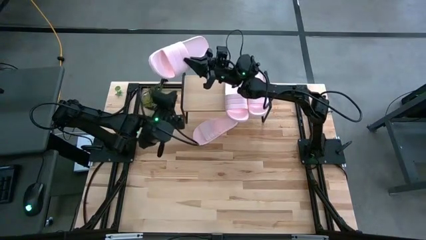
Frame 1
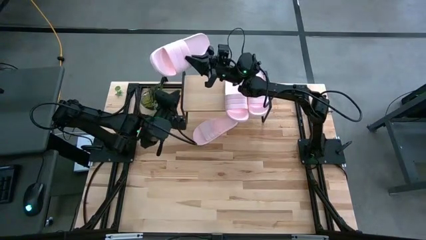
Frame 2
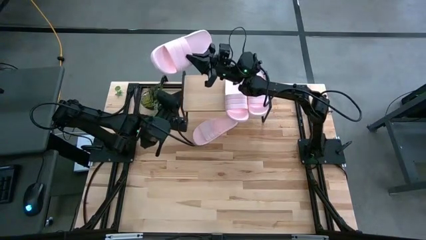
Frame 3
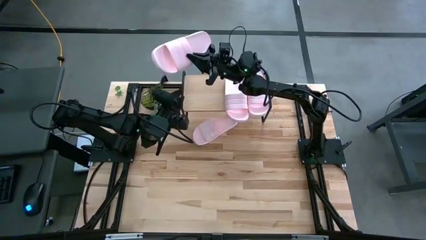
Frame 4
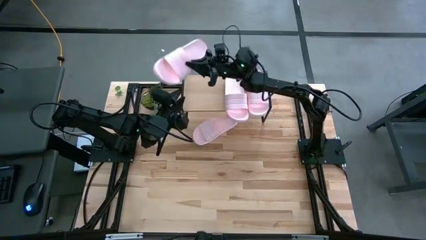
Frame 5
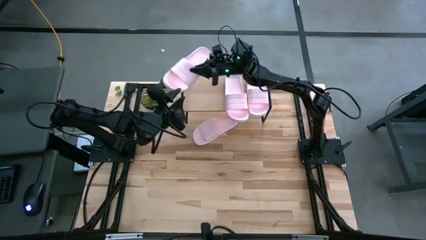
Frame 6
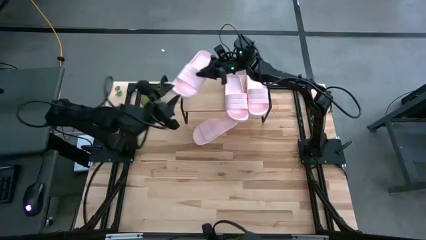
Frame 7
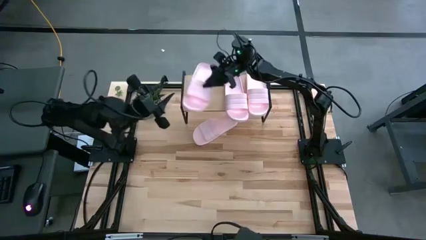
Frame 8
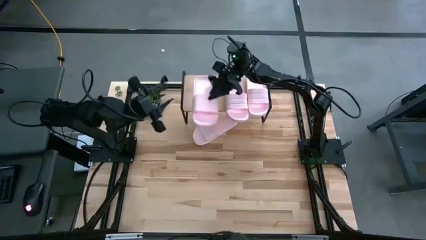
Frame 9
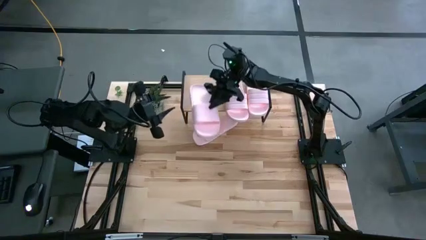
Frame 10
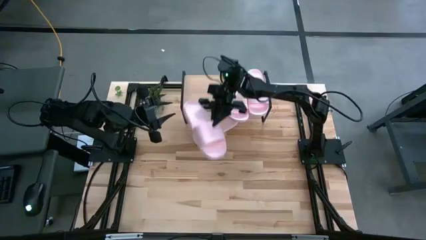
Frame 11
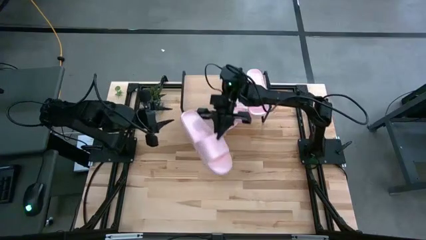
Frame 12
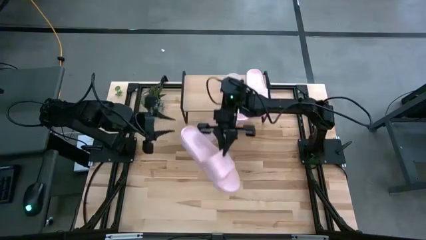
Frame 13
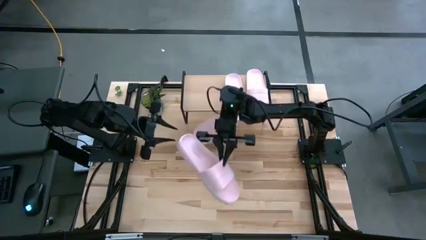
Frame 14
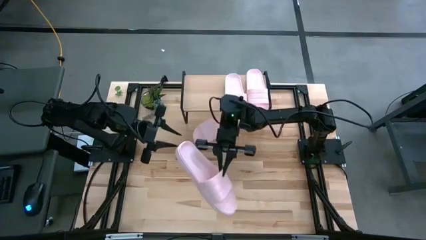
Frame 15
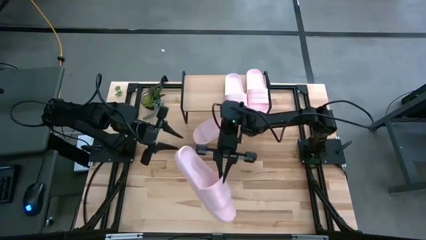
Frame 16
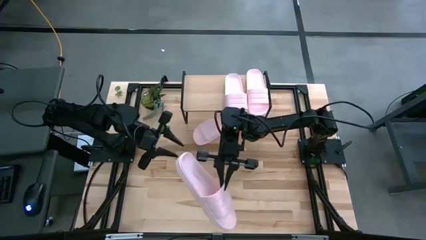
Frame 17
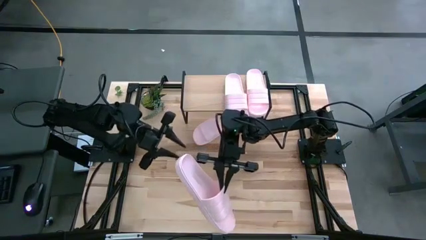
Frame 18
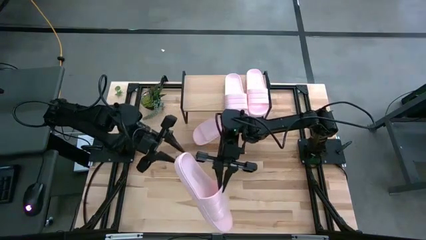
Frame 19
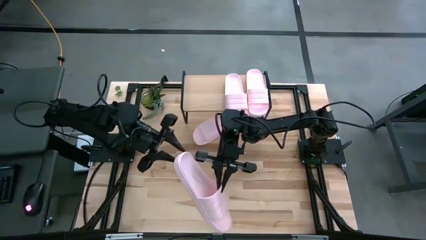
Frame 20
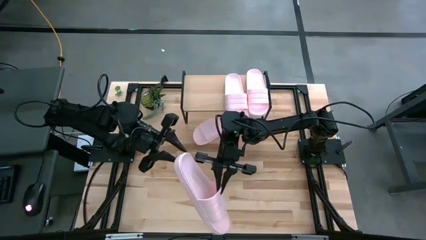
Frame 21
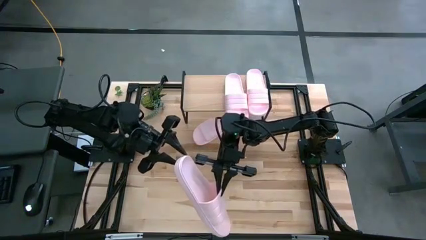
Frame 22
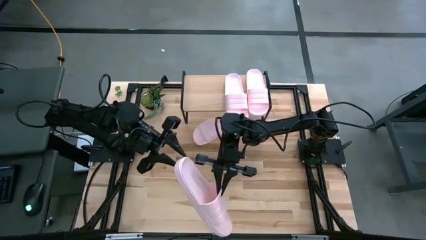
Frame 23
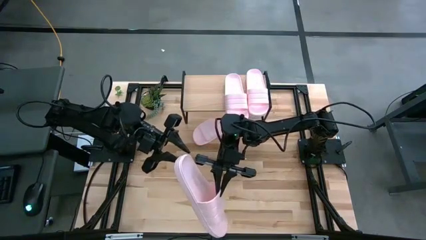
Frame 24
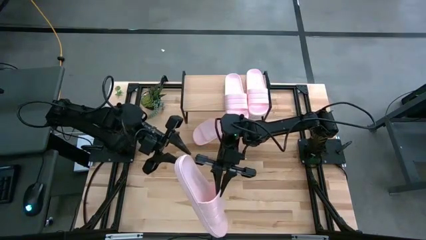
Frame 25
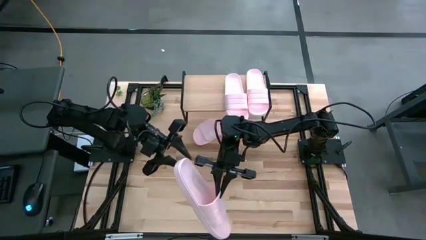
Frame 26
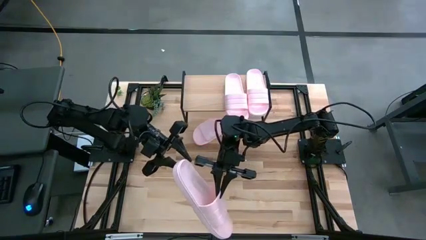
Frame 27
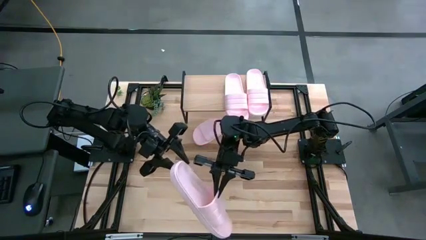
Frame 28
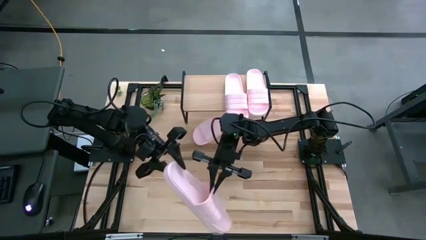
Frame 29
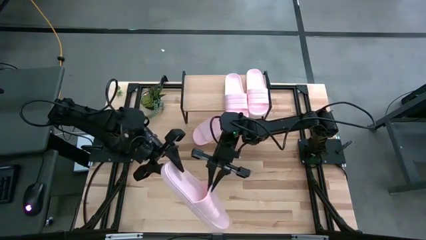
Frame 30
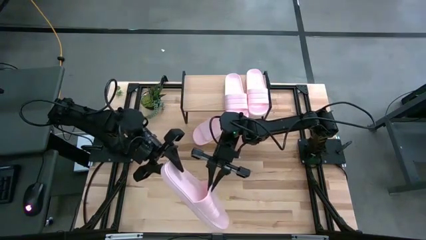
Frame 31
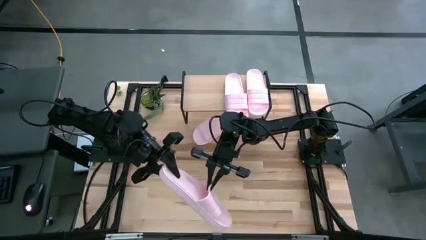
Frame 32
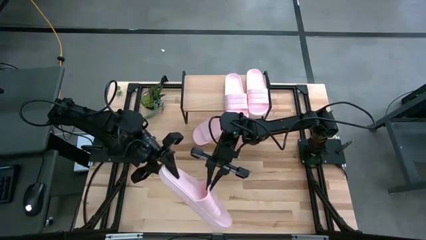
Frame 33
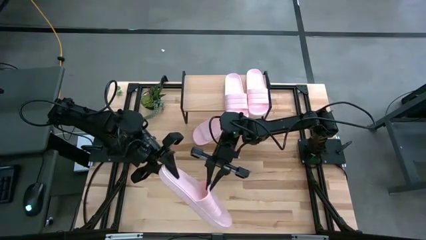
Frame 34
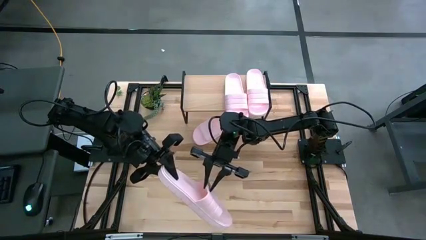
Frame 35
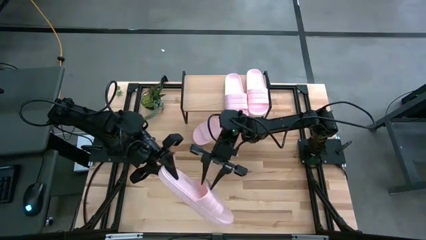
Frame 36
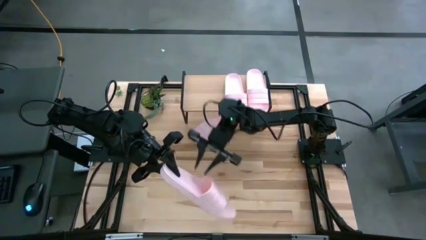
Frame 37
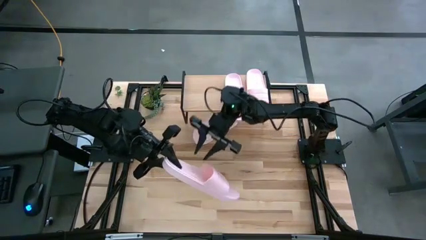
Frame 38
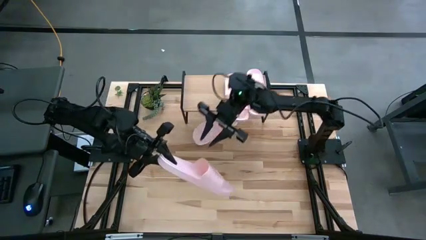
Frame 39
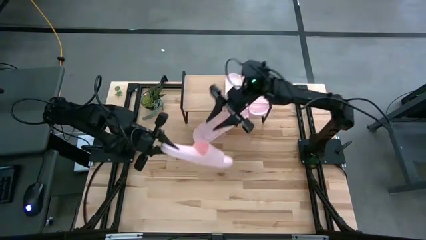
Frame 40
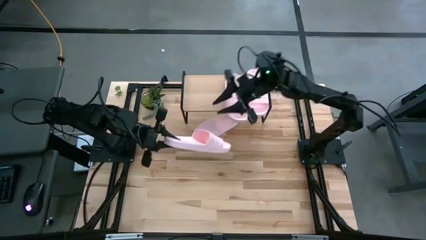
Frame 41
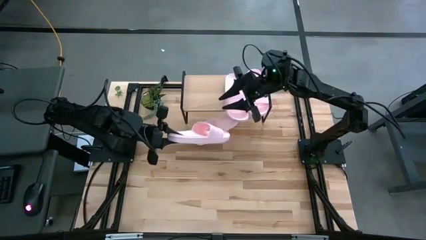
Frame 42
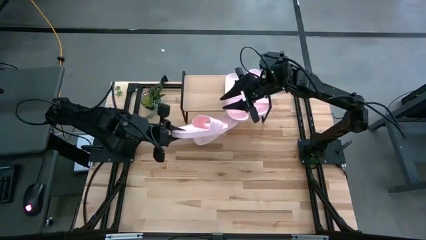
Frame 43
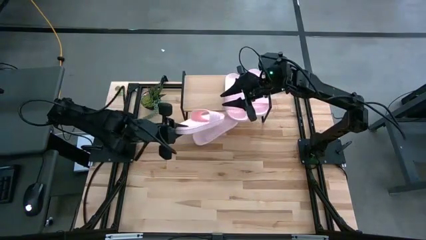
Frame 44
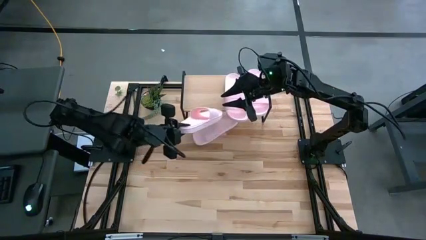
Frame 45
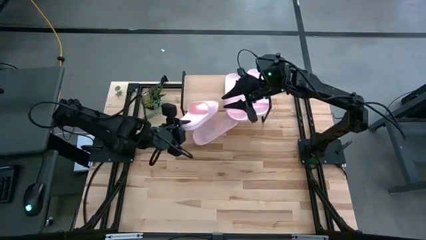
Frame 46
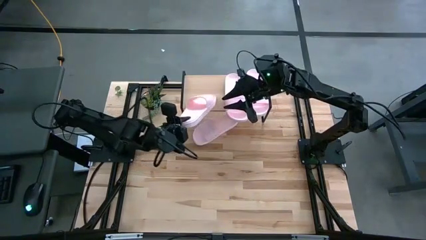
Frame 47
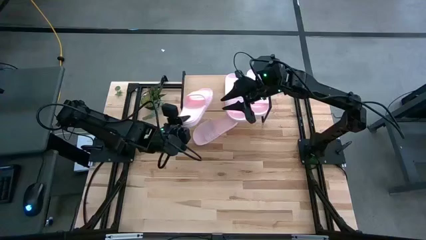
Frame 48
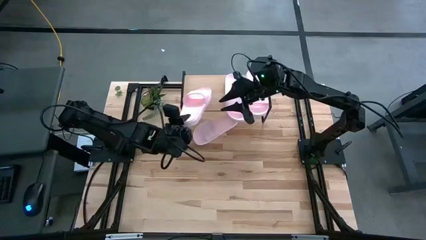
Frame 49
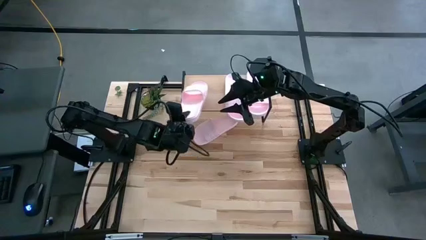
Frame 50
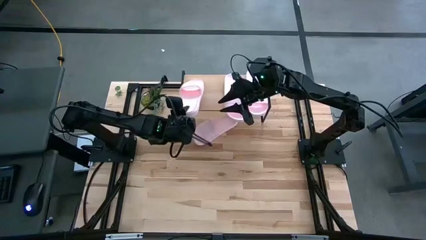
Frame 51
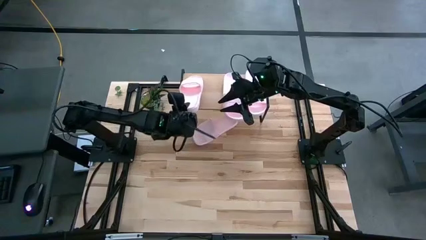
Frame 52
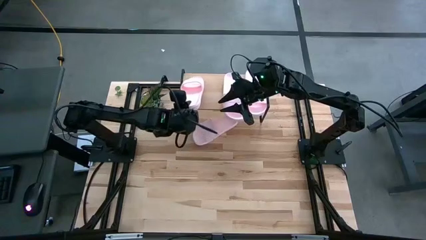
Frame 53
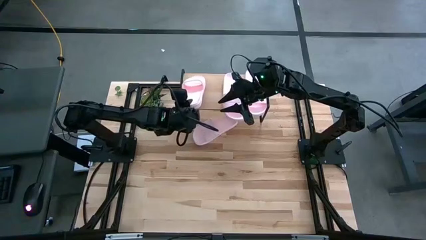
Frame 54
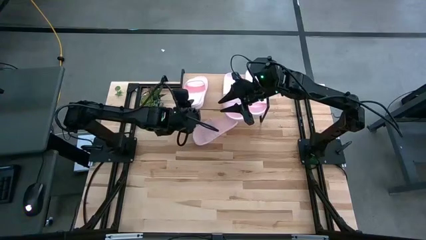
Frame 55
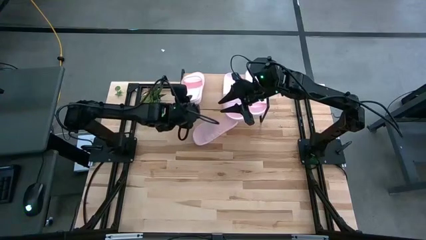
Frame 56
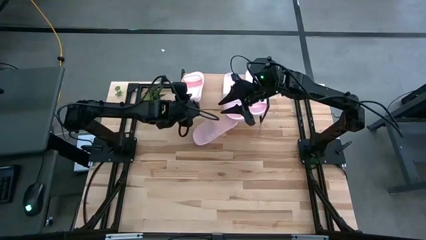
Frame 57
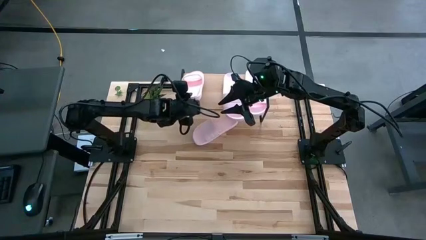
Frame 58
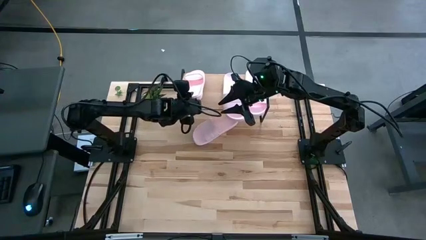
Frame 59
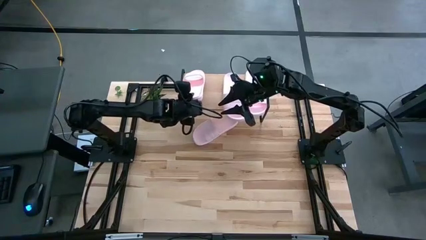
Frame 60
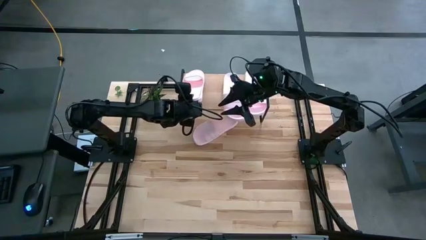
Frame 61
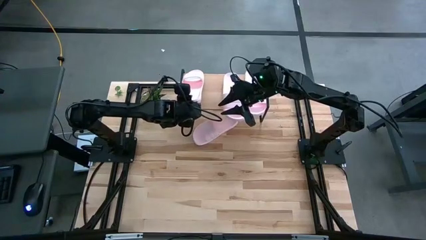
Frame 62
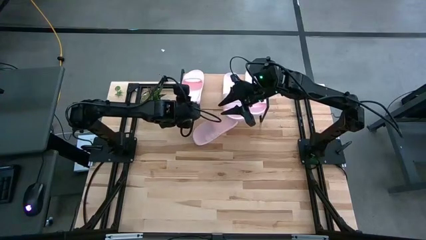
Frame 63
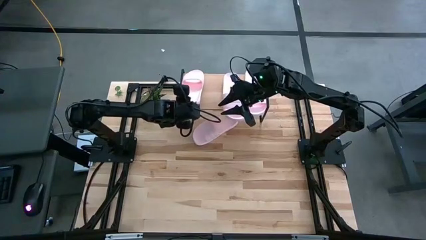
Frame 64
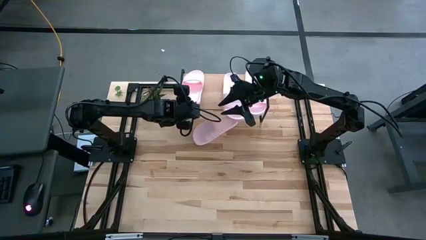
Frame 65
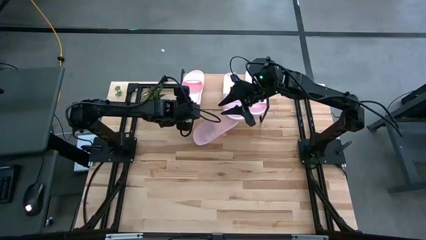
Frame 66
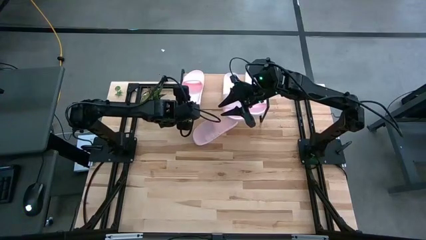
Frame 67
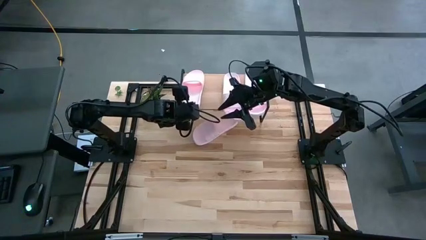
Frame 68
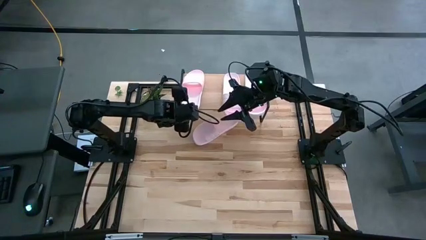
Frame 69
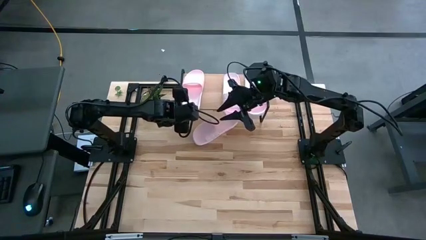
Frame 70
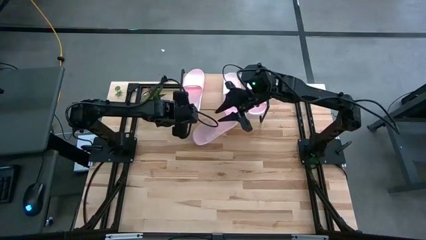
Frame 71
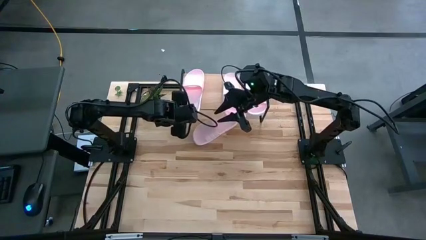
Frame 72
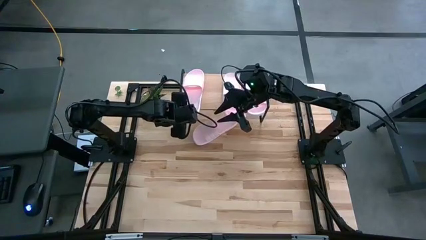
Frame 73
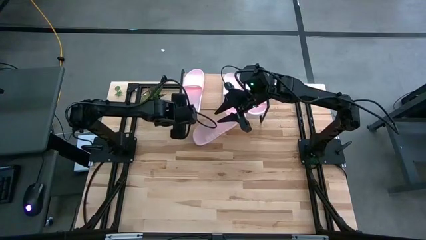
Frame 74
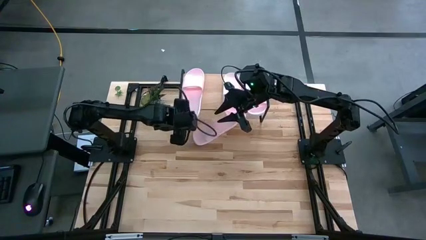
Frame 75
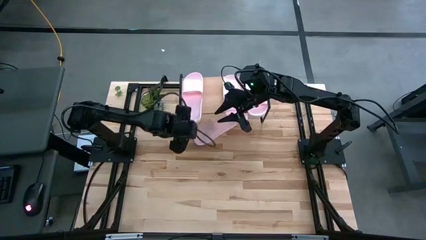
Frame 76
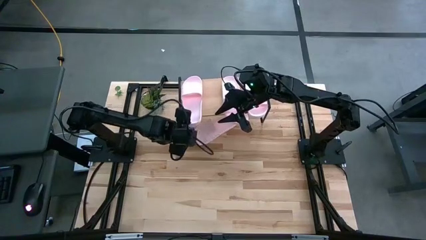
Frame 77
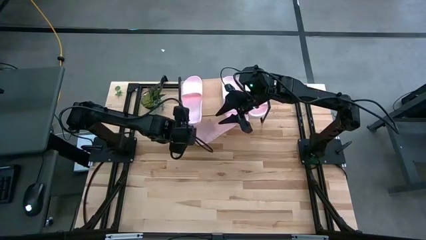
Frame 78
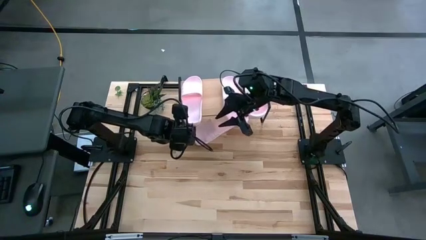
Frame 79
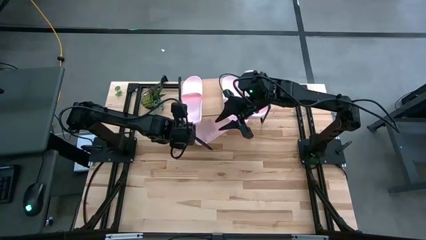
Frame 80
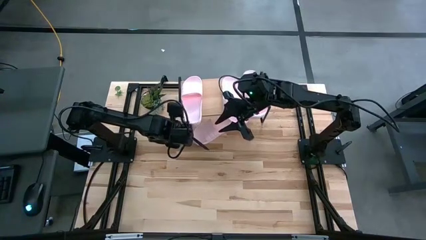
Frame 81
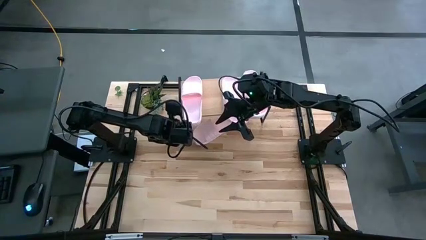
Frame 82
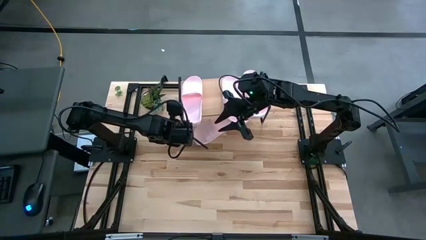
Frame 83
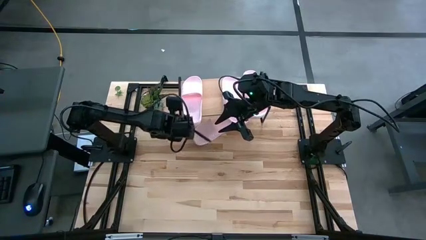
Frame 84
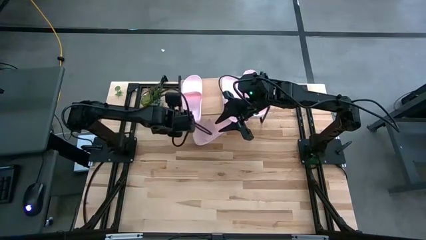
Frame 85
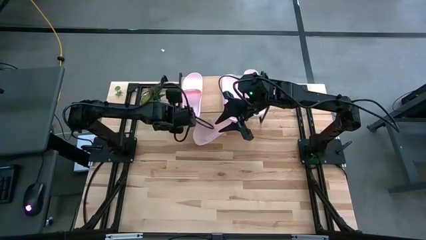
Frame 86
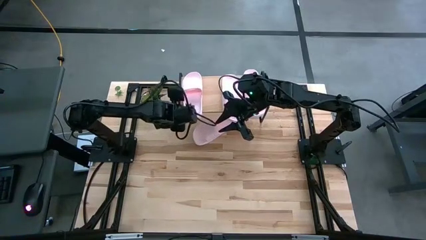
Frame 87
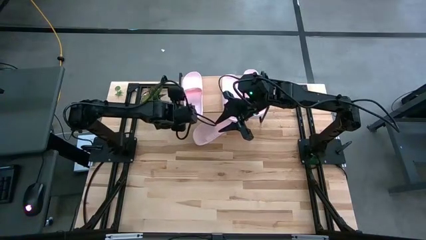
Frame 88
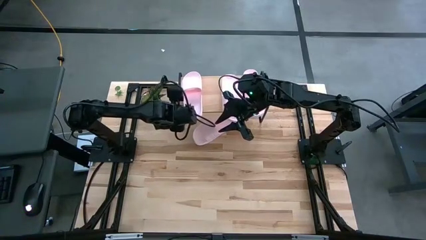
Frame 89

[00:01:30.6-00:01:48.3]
Task: Pick and place slides into the shelf
Put the pink slide on the shelf
